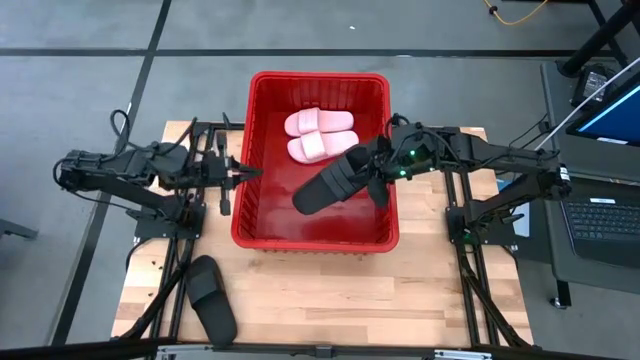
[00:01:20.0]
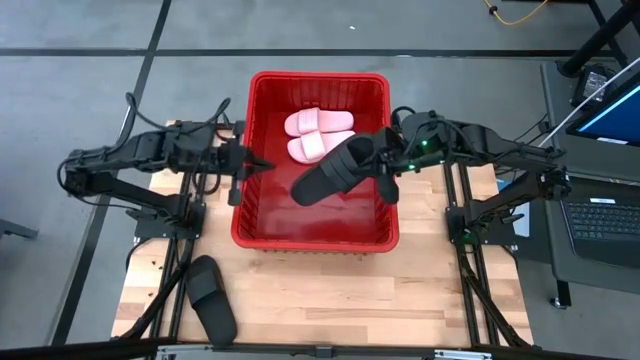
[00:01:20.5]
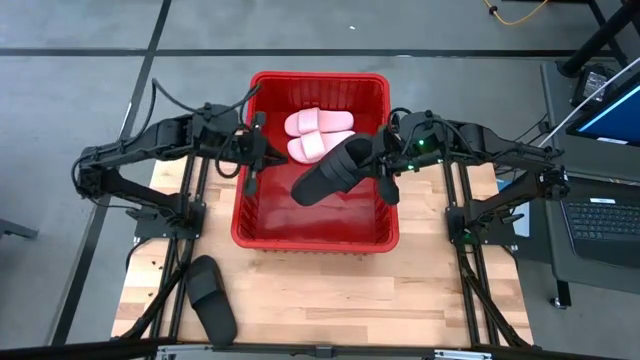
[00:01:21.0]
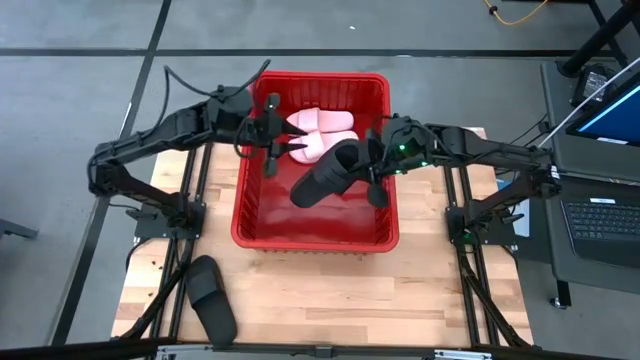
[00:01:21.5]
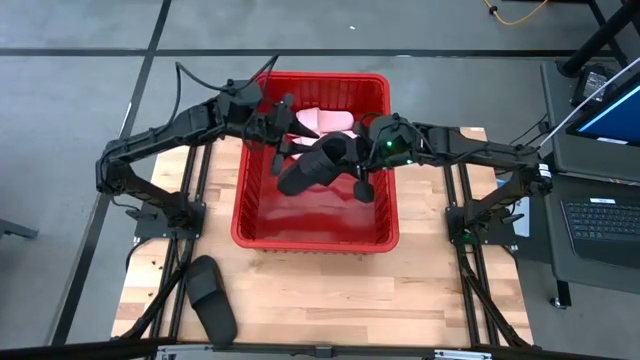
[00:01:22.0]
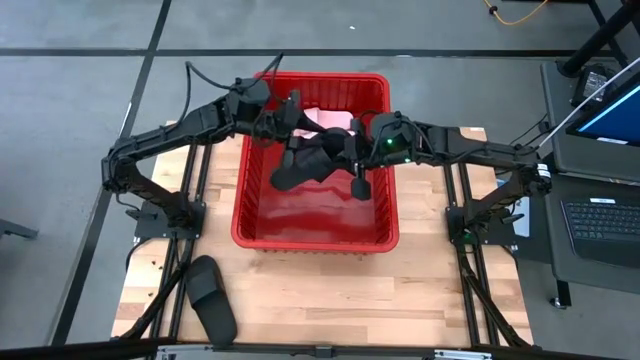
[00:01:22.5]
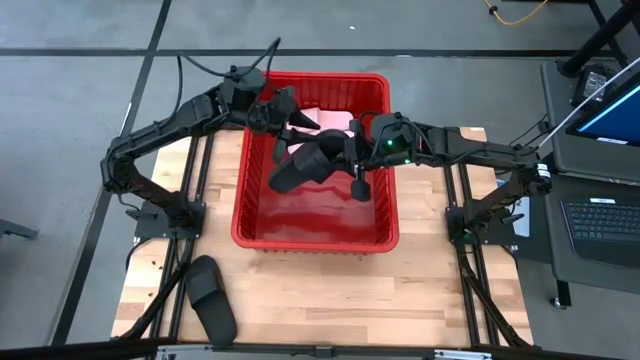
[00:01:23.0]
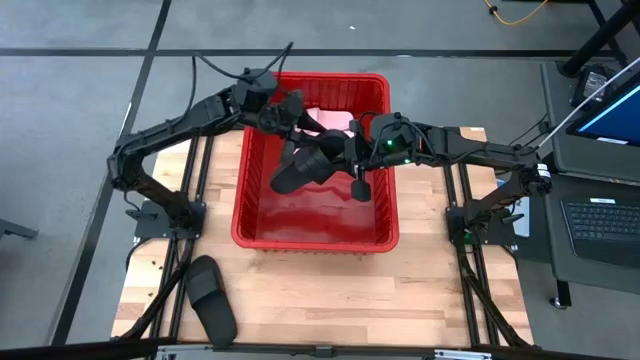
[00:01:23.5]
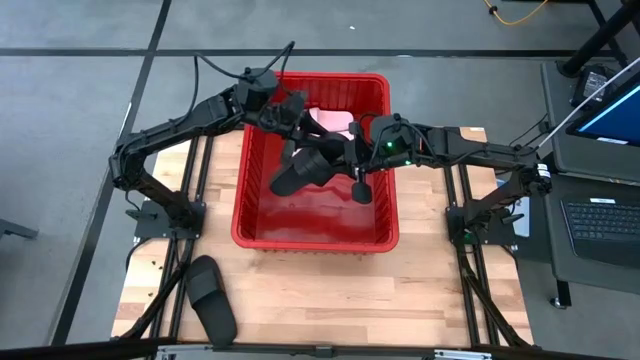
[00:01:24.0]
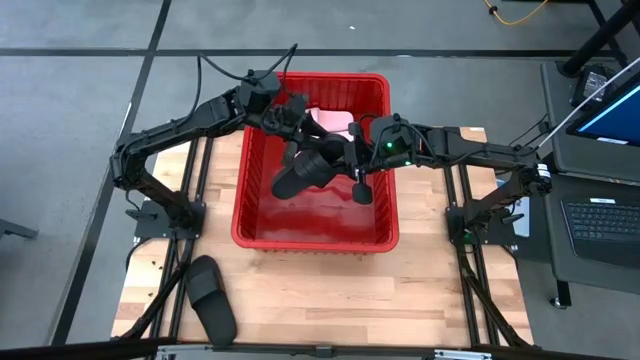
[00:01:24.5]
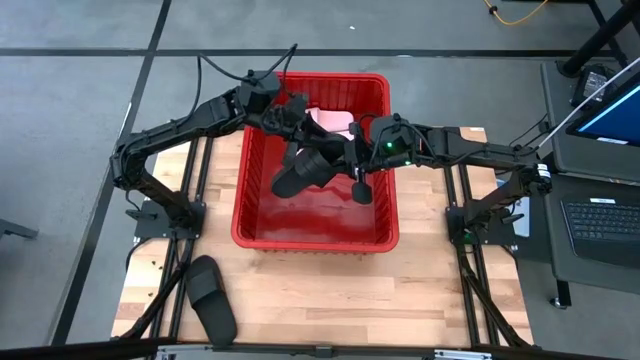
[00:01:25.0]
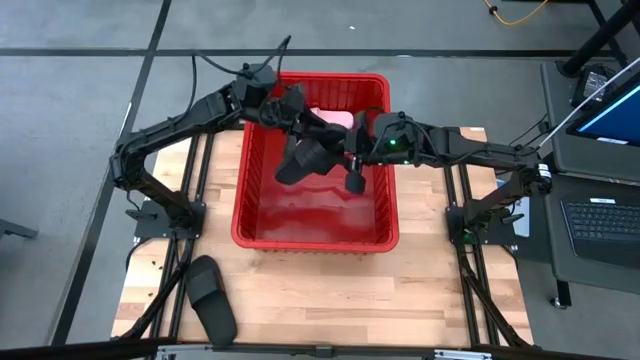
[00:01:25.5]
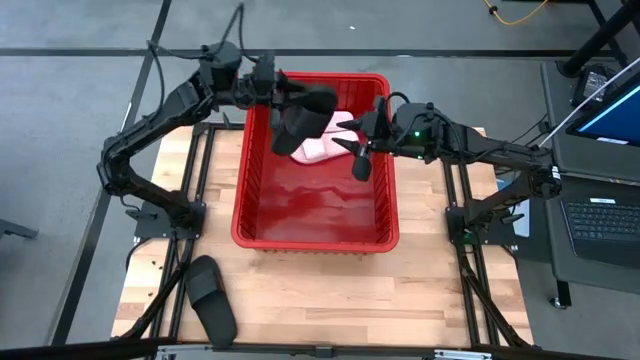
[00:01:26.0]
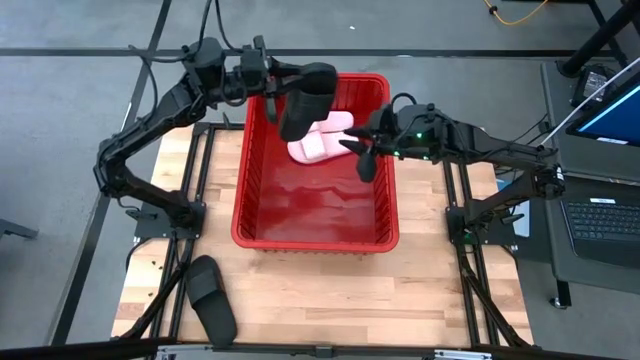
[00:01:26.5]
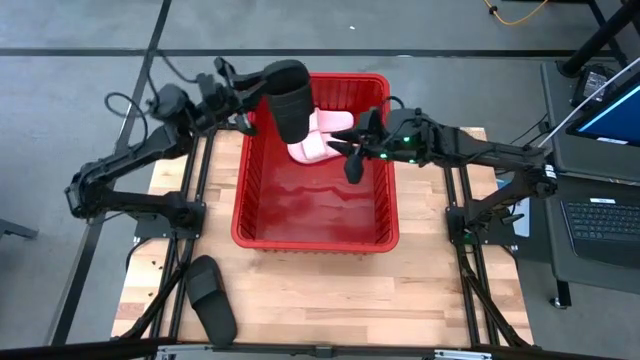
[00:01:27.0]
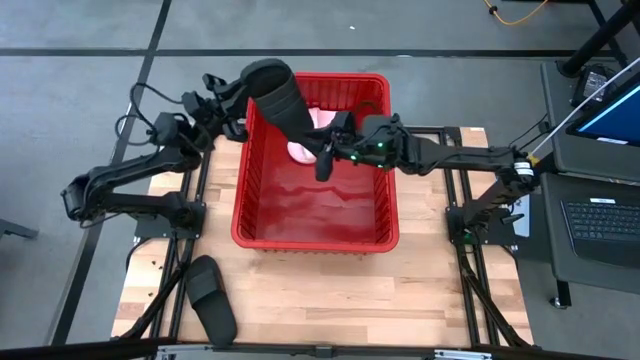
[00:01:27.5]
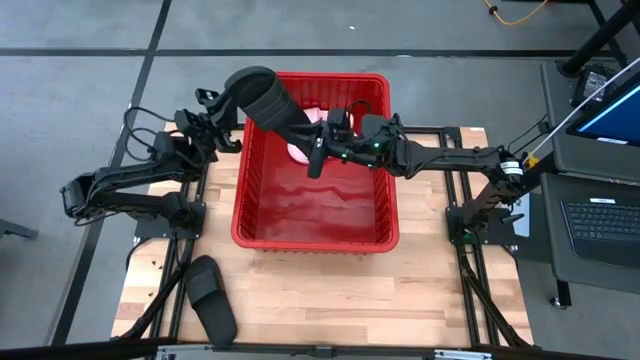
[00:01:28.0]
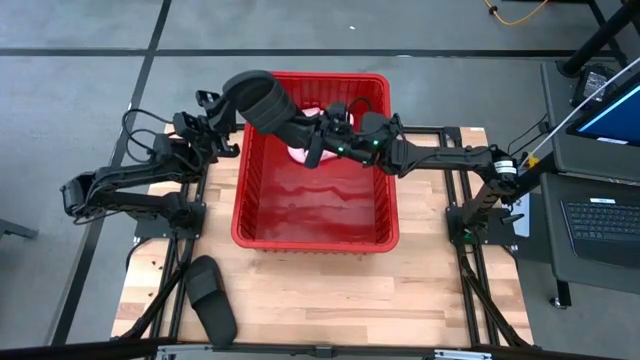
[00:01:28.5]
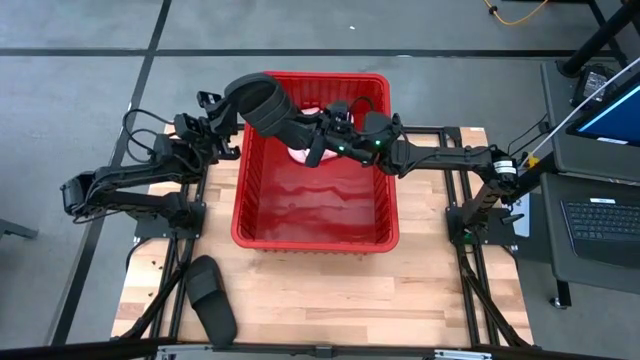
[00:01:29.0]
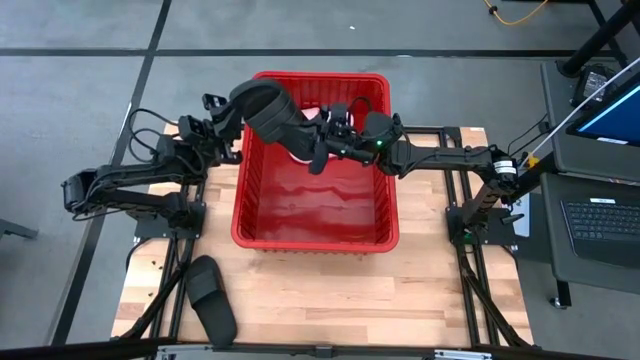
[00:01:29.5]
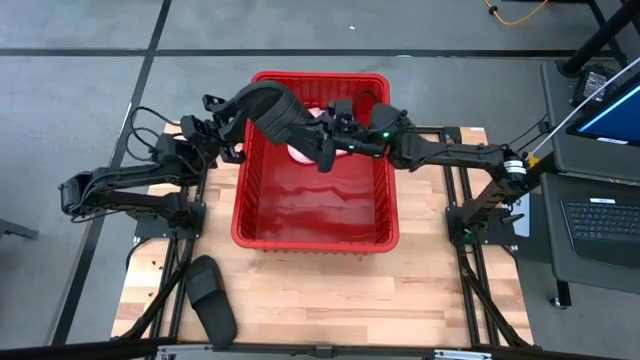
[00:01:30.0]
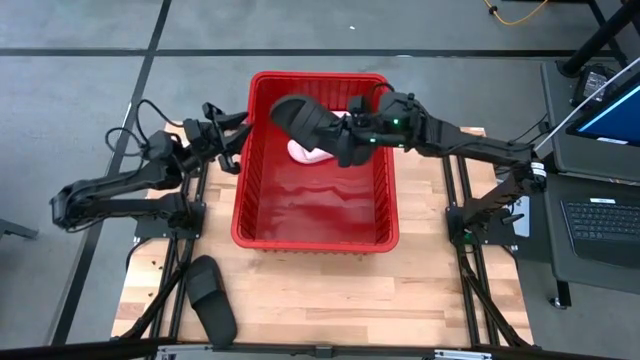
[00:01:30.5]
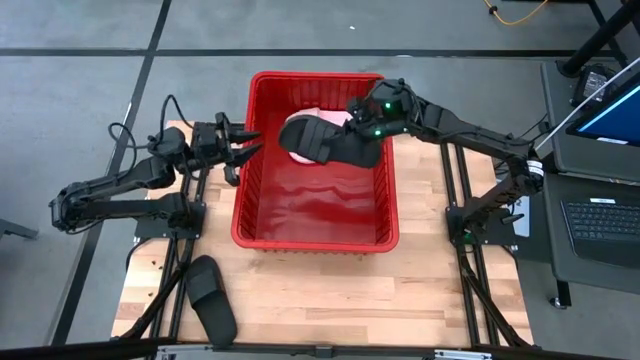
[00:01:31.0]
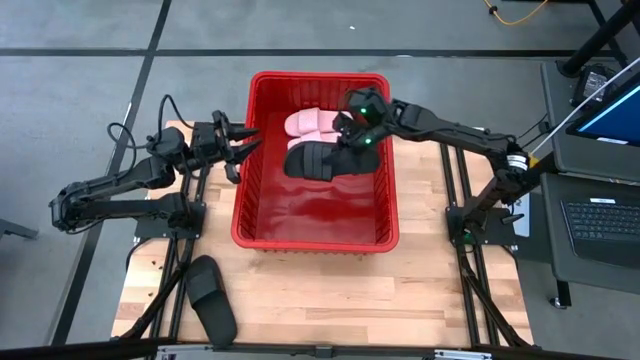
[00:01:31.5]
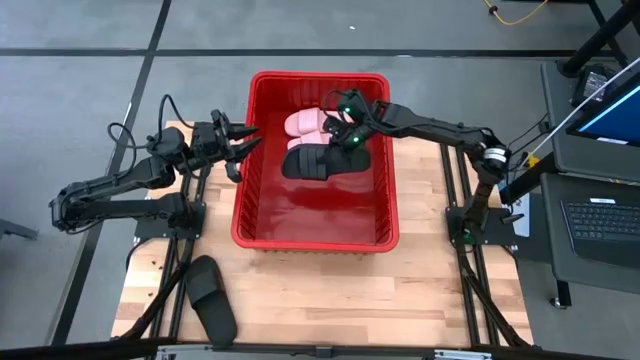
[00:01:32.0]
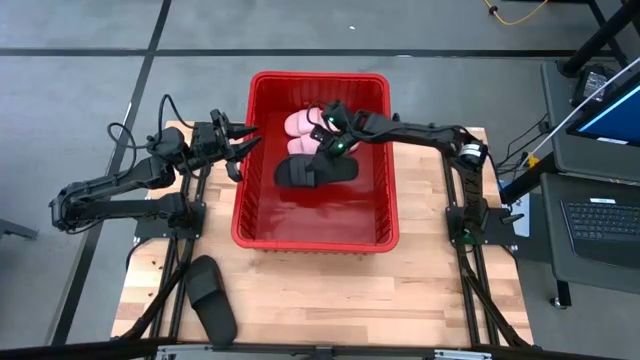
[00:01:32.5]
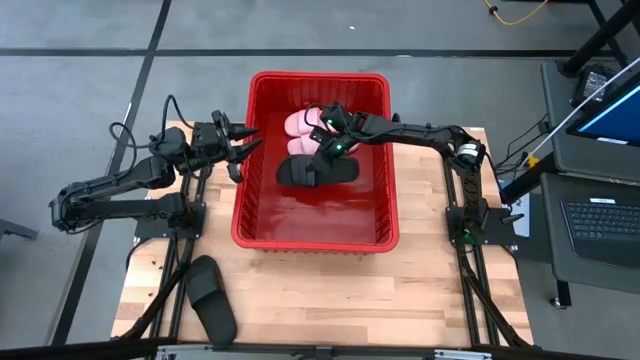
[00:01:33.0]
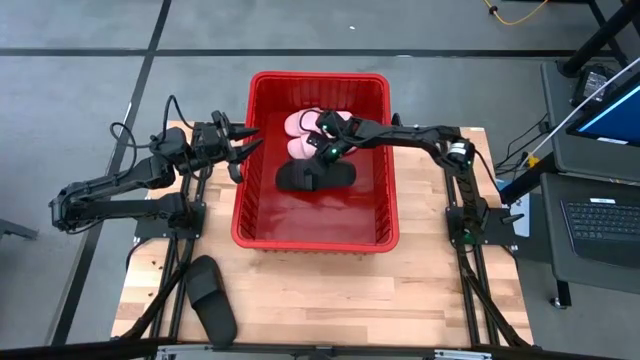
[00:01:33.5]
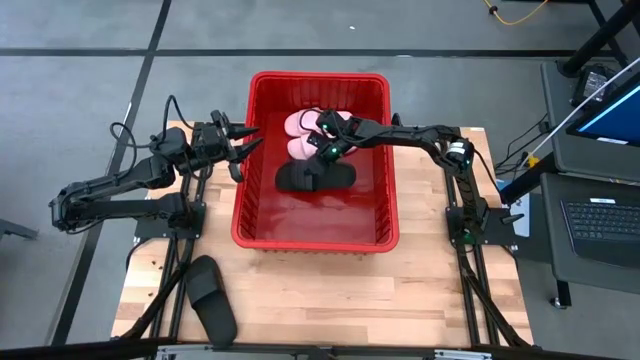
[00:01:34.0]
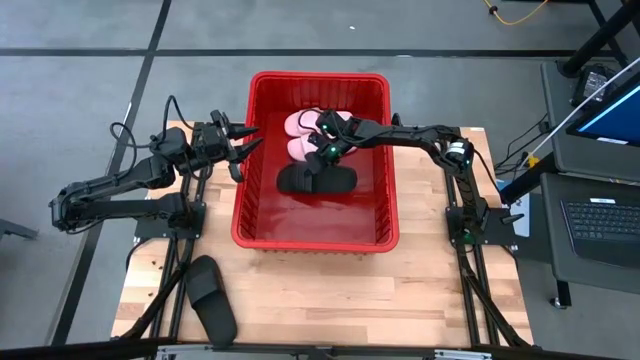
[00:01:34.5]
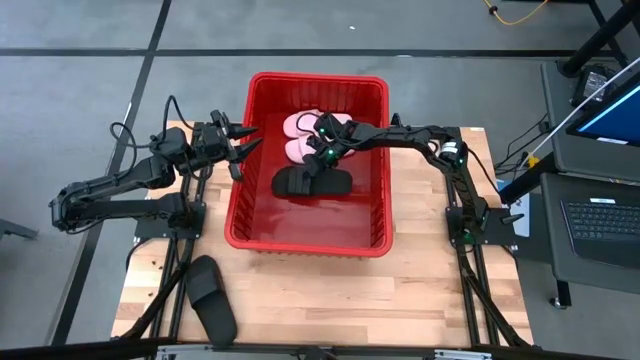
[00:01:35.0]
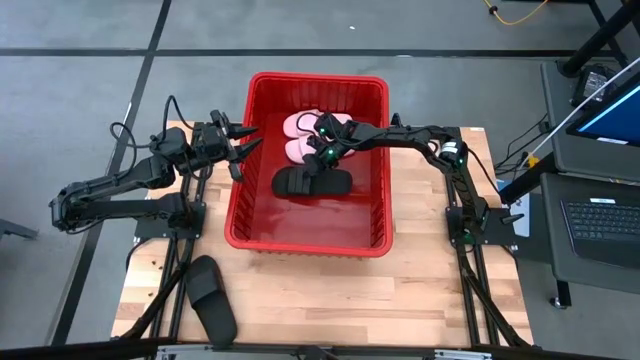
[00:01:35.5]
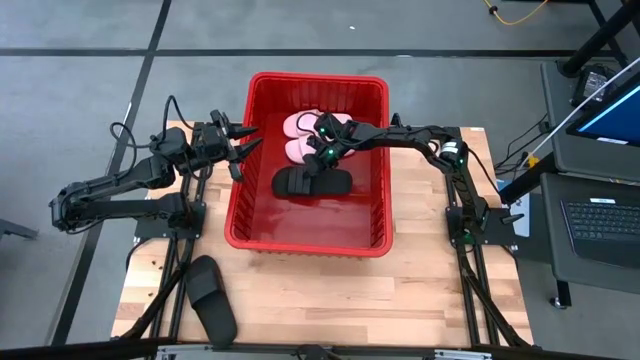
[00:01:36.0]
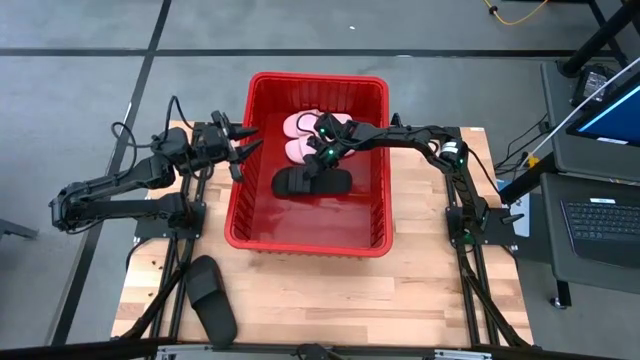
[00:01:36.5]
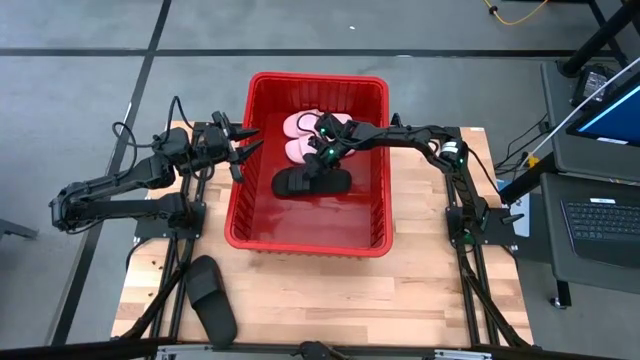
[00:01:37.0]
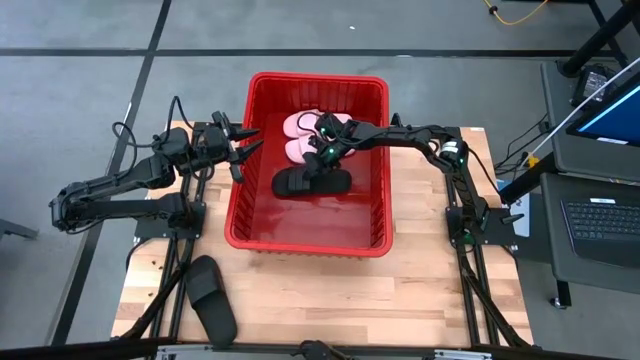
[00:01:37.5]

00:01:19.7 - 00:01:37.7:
Task: Pick and place slides into bin
Put the right black slide into the bin
